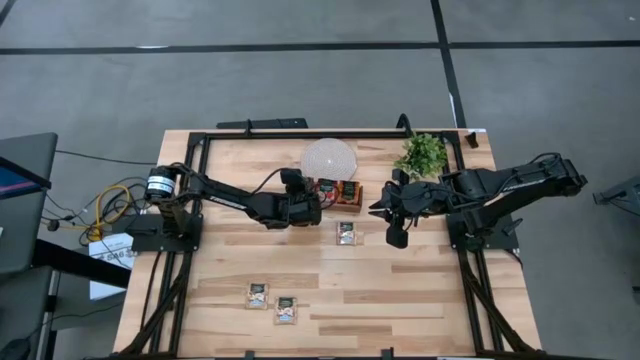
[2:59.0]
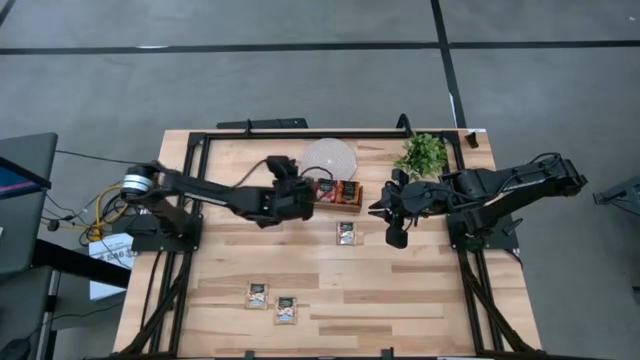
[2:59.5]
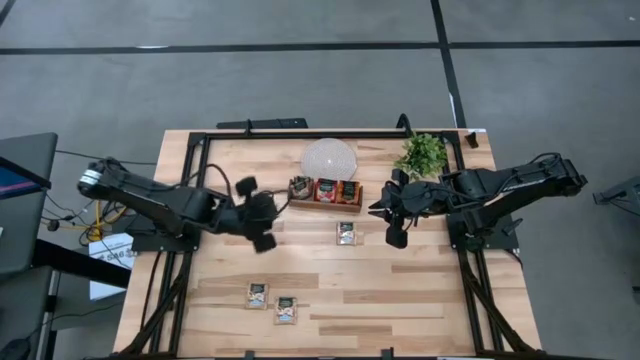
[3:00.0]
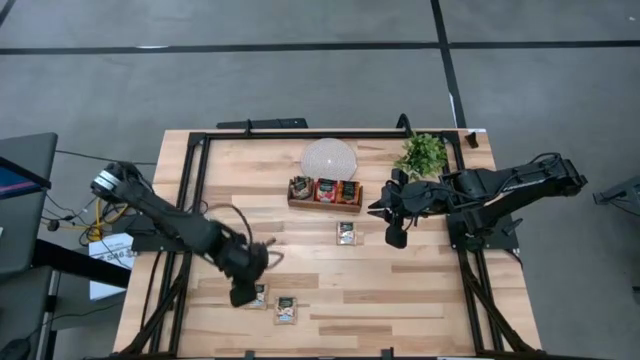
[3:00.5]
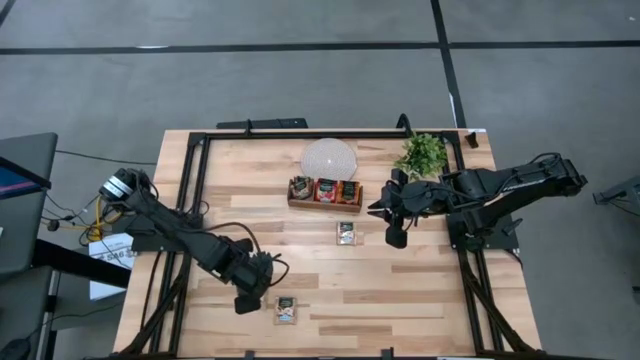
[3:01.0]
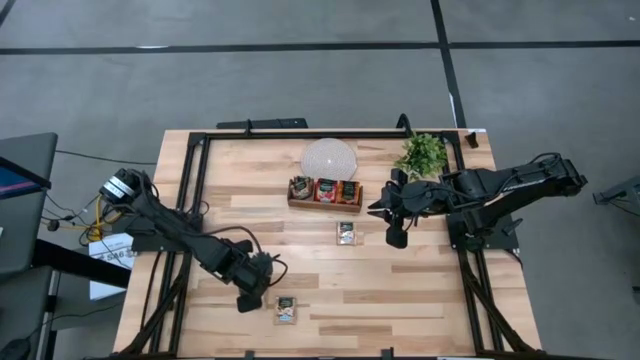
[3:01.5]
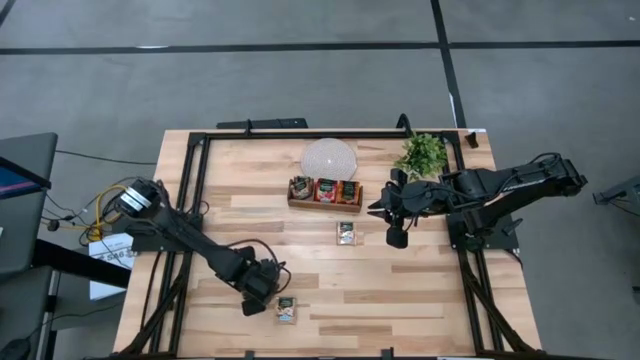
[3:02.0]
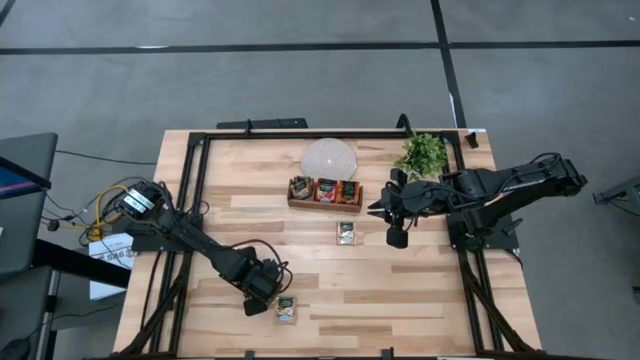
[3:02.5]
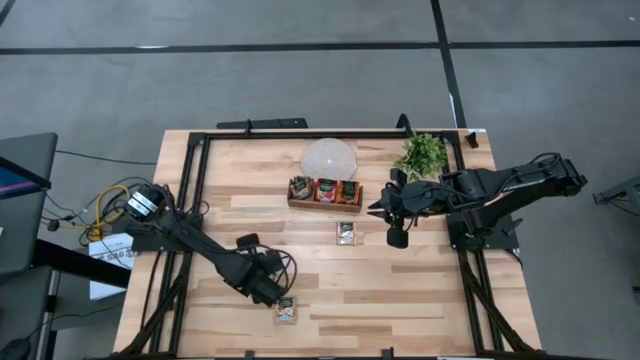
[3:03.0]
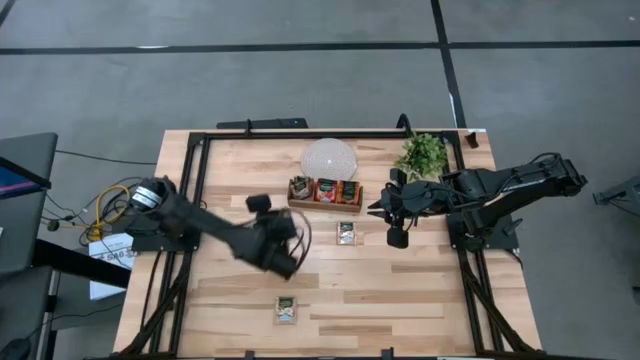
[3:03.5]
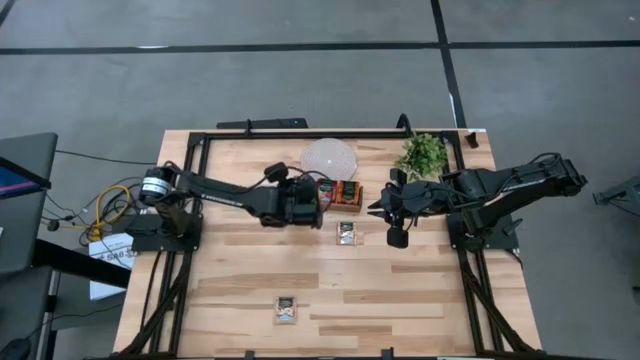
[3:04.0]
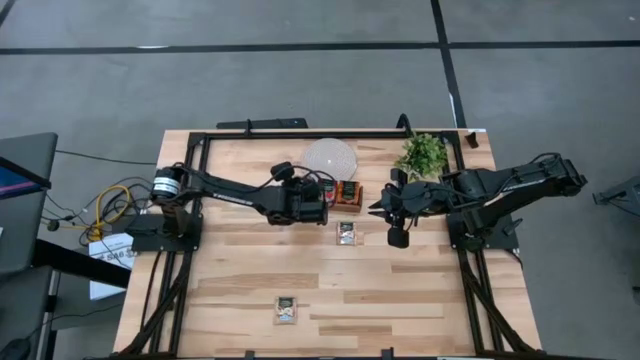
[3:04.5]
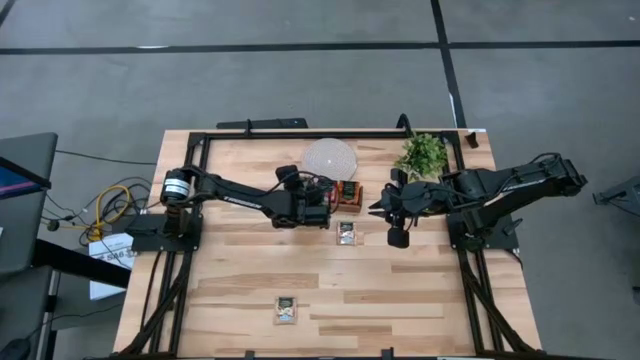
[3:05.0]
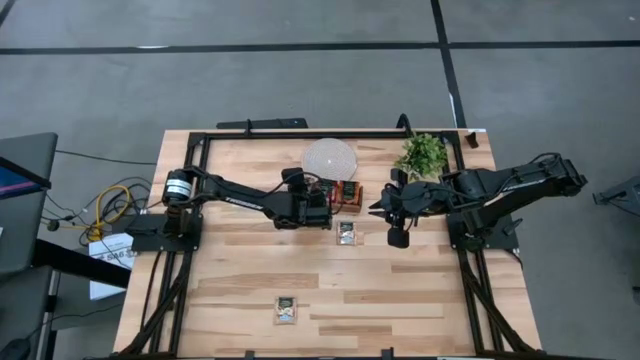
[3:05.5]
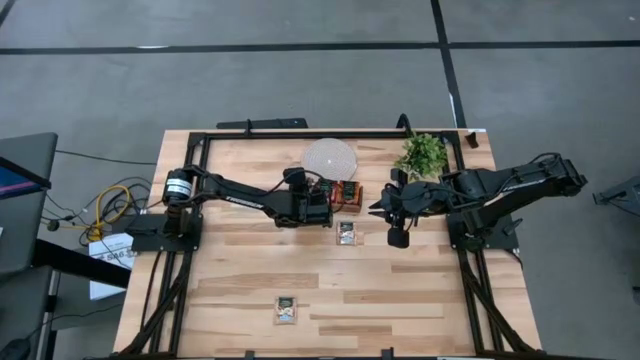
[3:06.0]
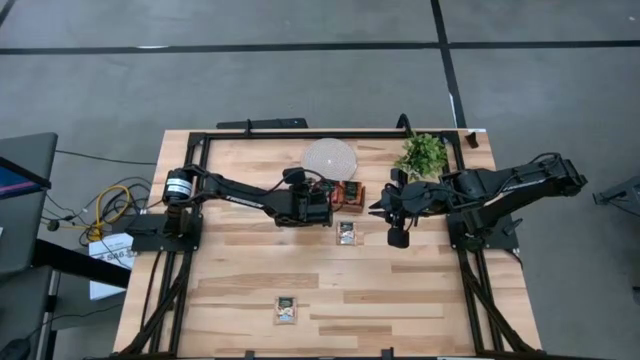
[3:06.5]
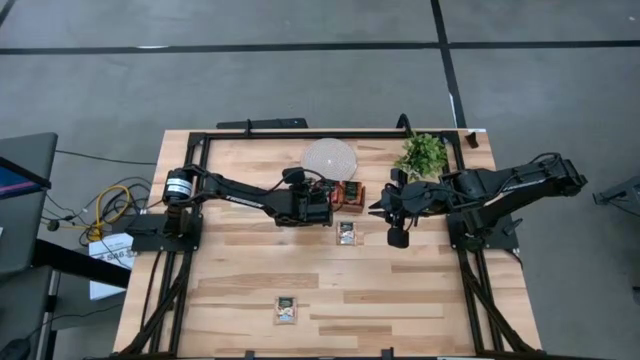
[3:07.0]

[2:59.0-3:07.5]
Task: Pick & Place Tea
Put the bottom left brown tea bag into the left compartment of the wooden organizer

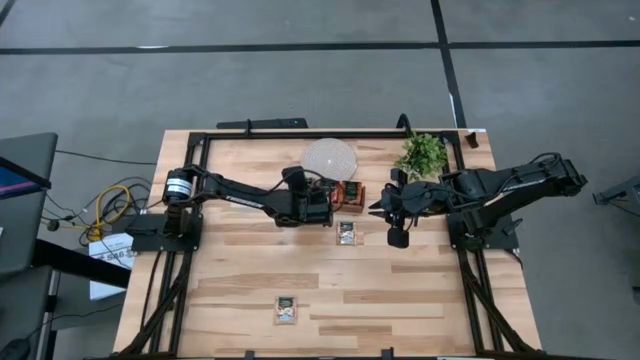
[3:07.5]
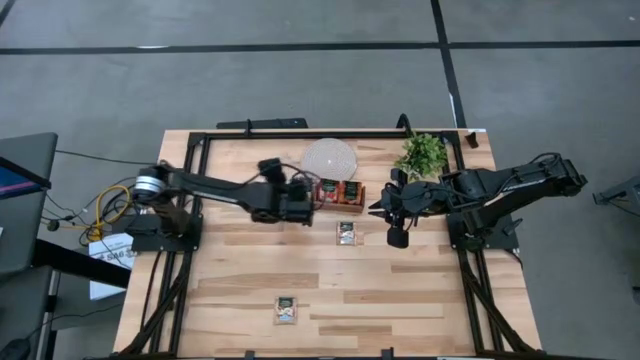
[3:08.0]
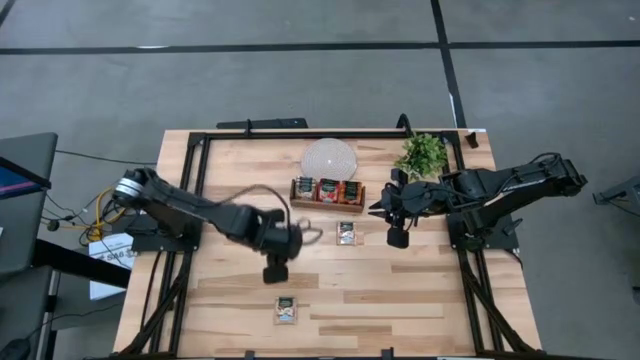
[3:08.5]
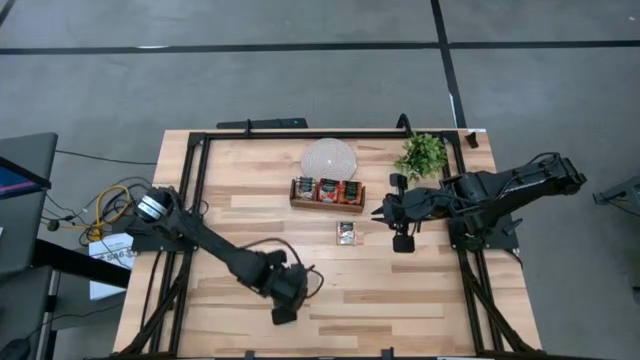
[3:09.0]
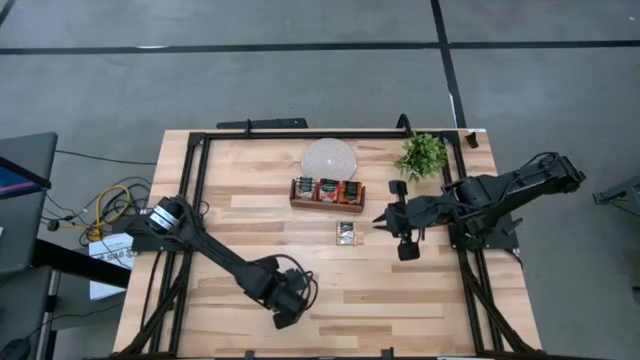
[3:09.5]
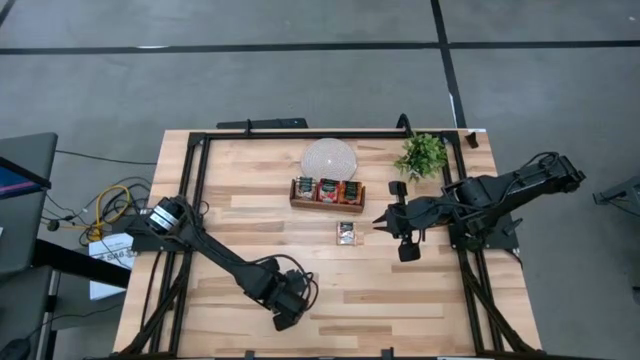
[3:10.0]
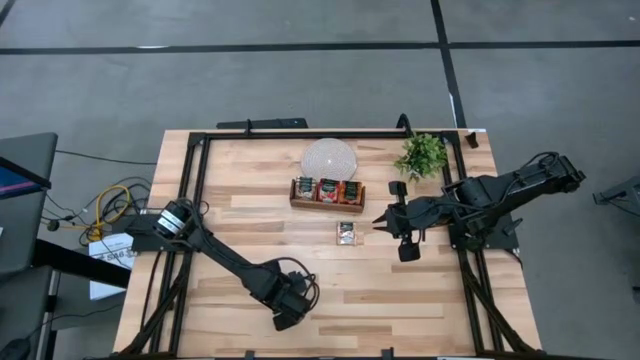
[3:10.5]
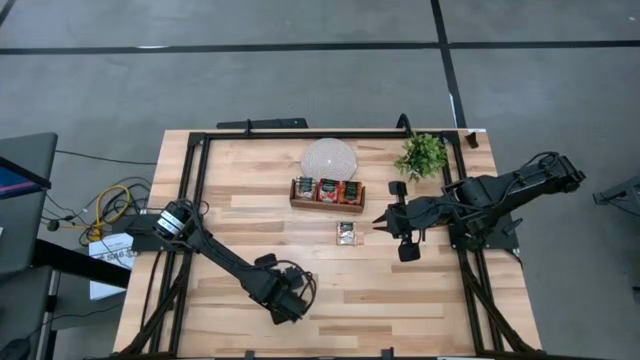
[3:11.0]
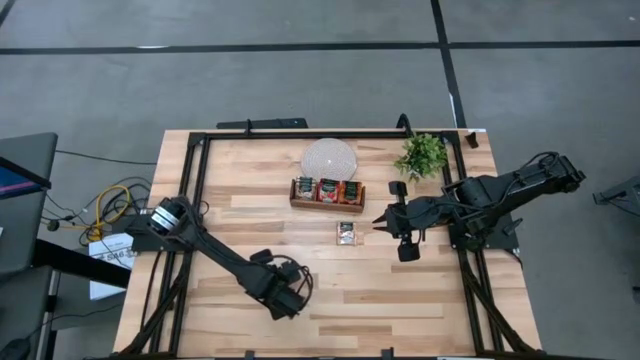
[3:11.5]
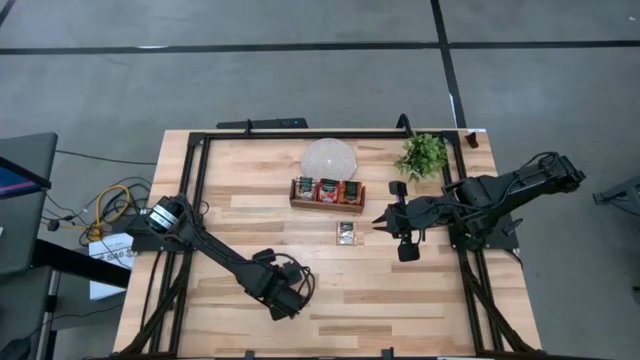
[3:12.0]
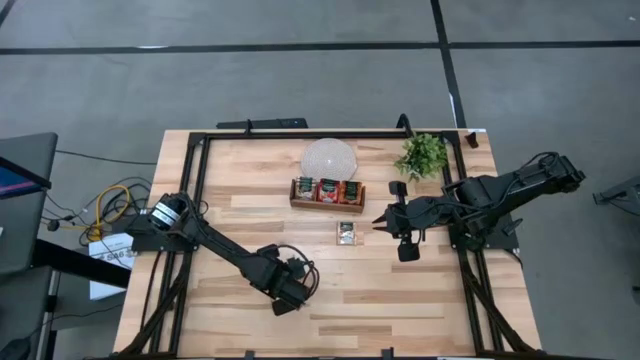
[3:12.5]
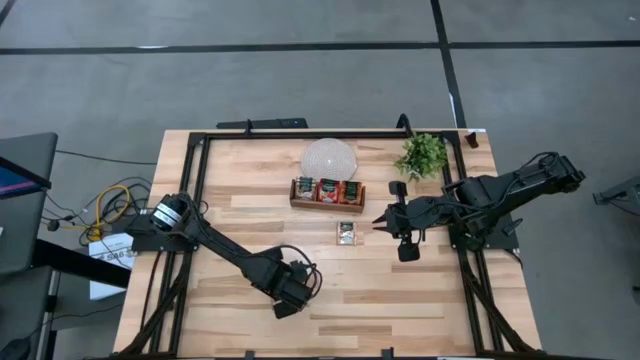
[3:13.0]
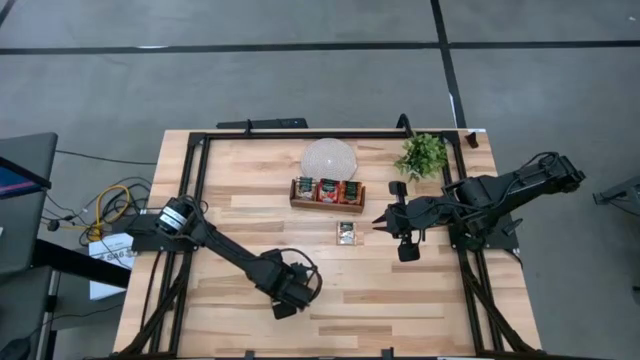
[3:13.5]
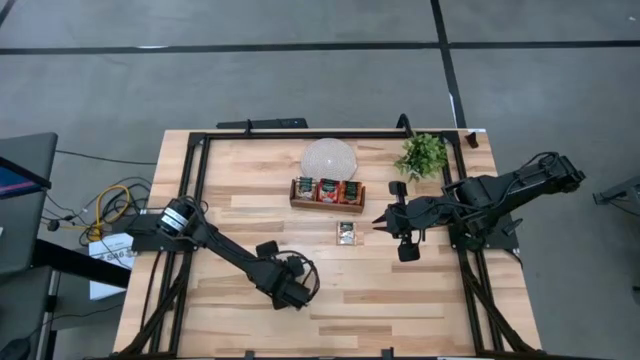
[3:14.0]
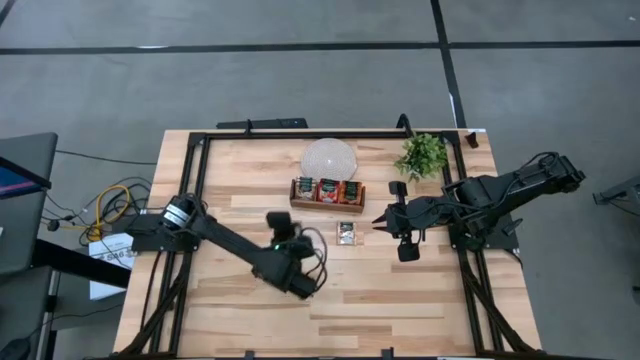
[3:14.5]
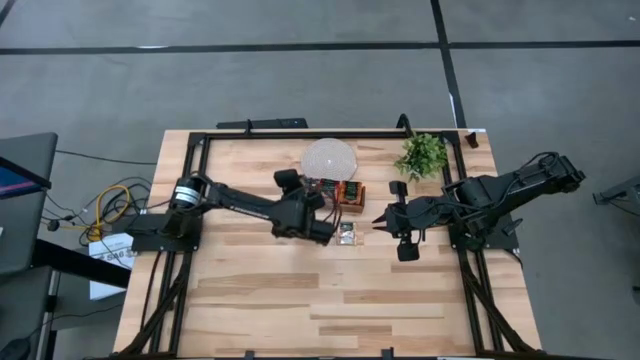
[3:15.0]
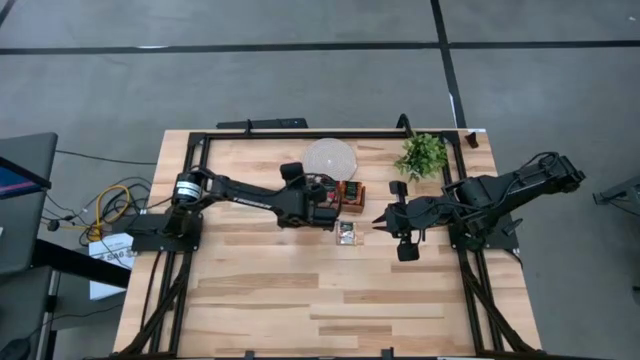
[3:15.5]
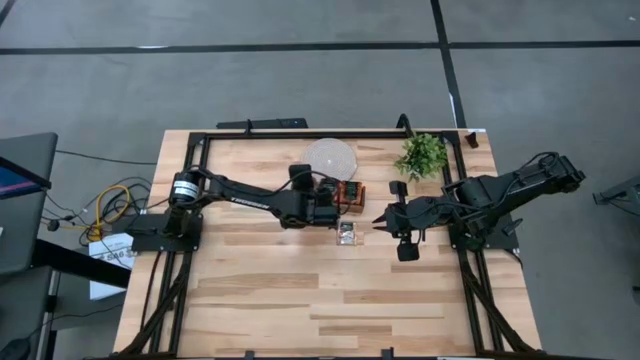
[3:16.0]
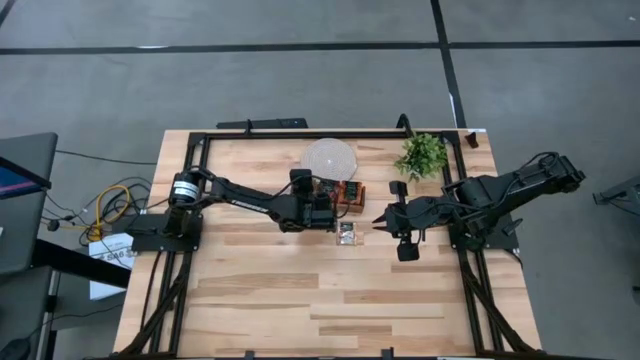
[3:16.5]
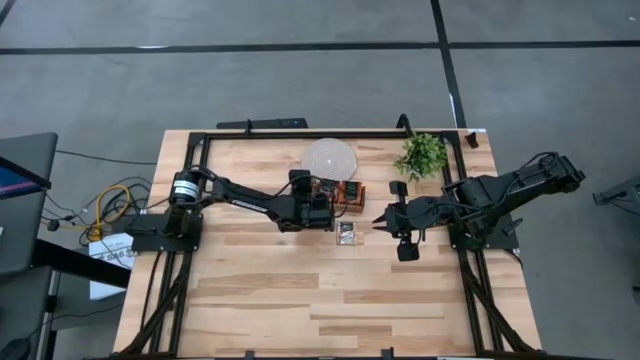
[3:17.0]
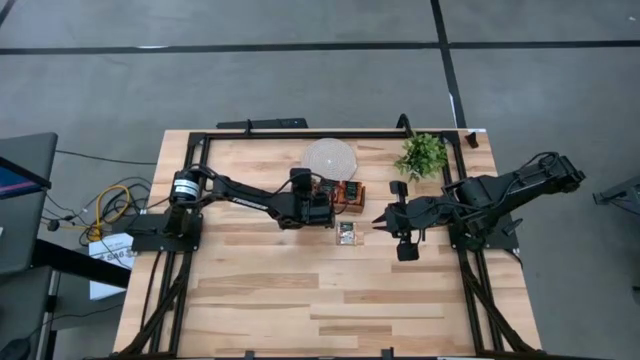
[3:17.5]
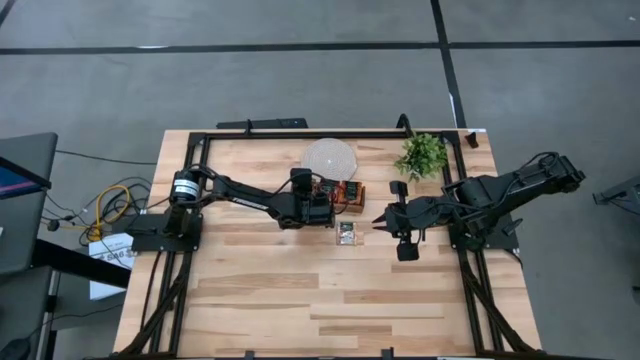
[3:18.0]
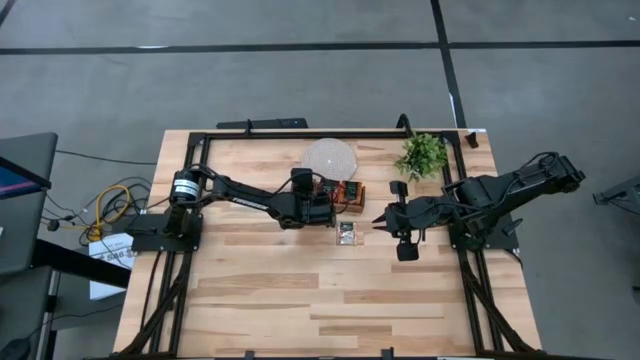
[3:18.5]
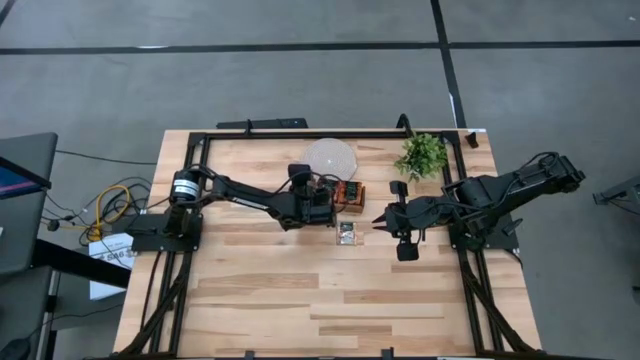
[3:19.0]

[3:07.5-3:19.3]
Put the bottom brown tea bag into the left compartment of the wooden organizer

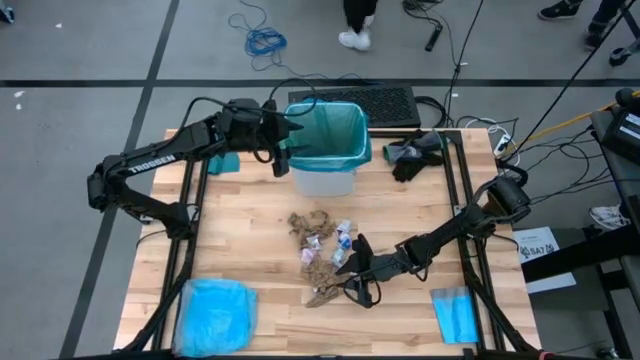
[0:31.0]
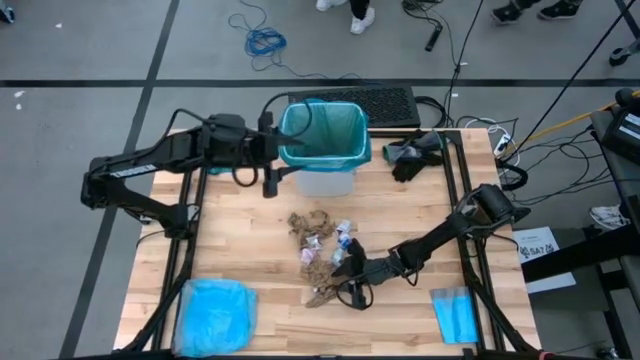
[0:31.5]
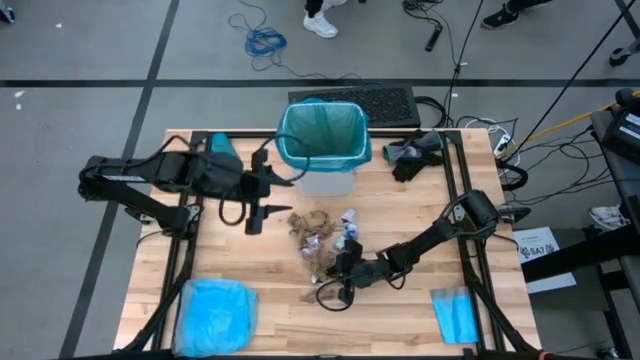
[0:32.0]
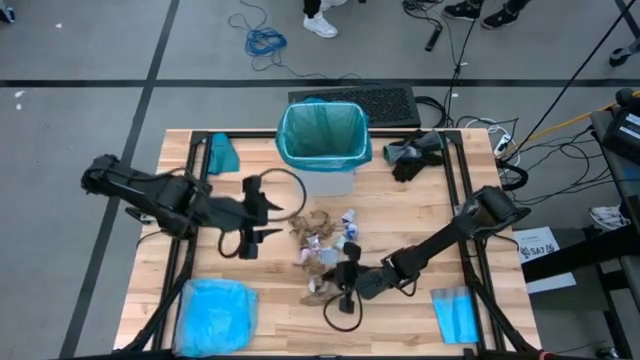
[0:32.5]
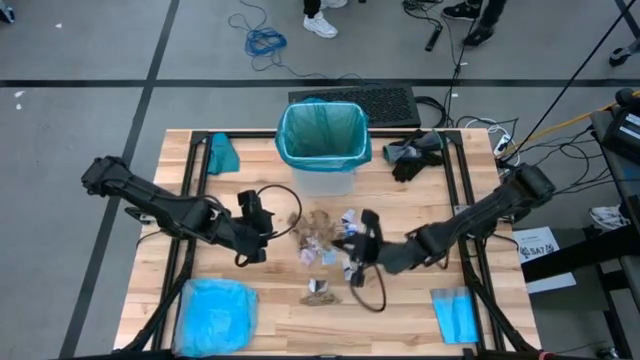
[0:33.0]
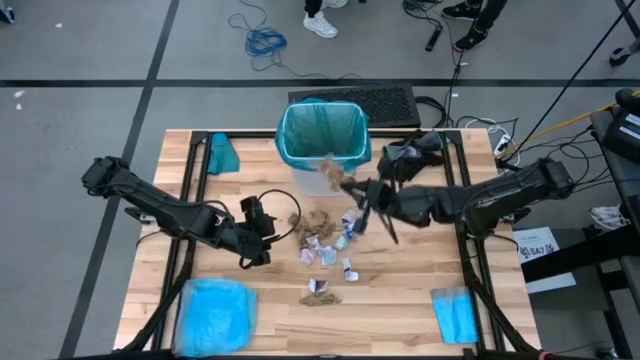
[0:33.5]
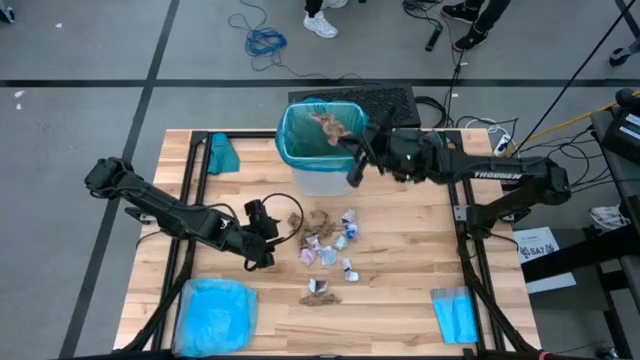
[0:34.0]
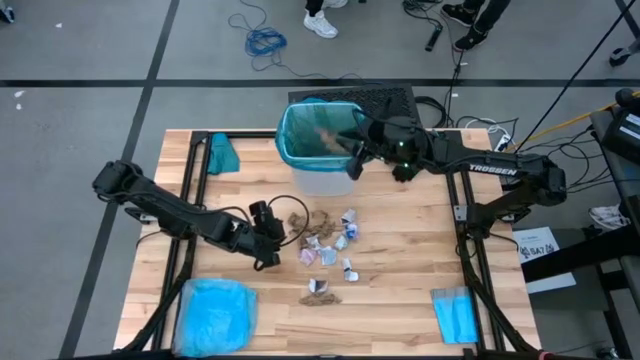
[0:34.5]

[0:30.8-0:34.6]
Task: place trash/remove bag and relplace
Put the brown napkin into the trash bin
